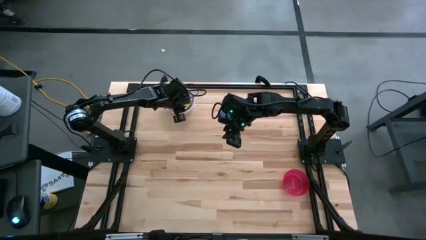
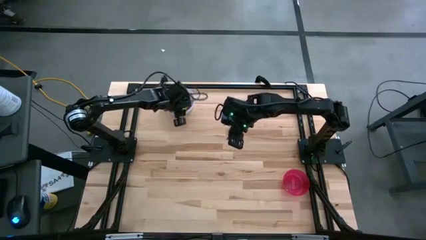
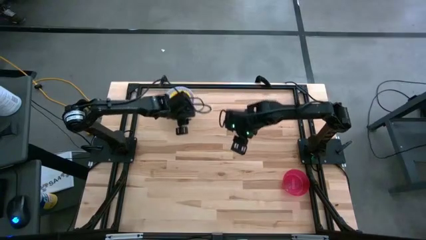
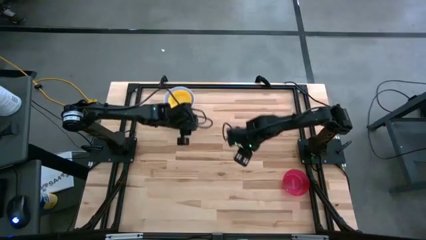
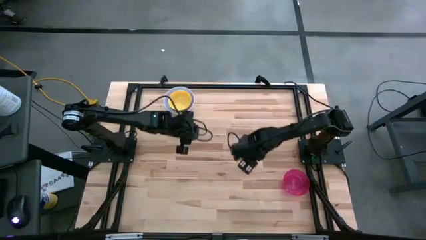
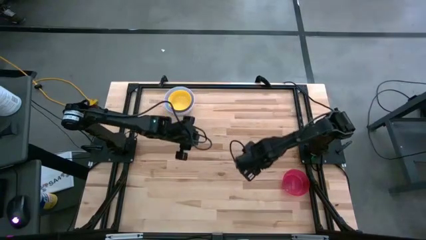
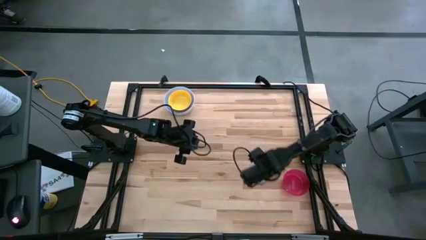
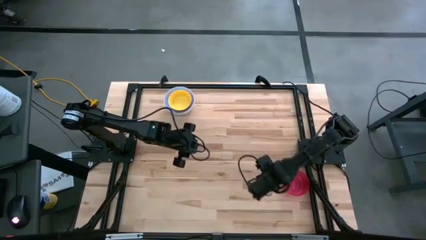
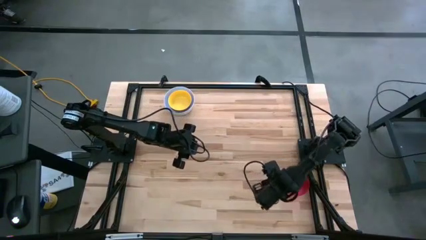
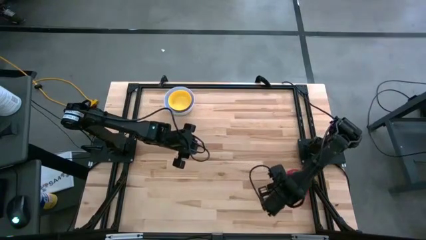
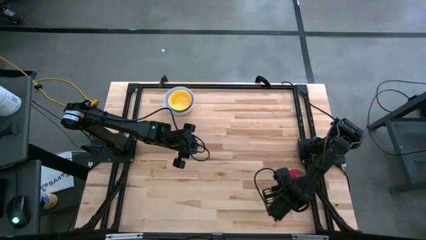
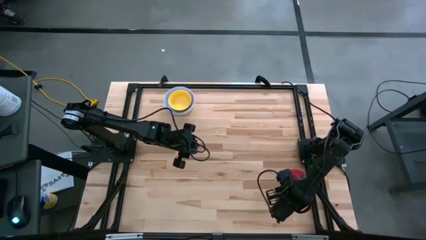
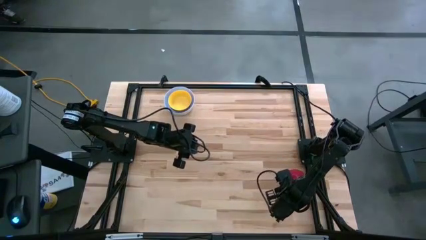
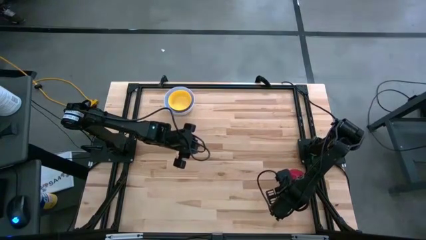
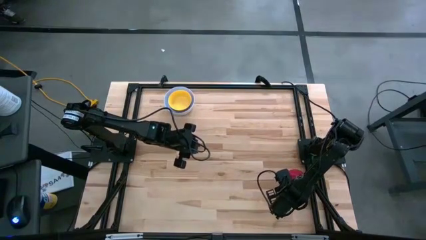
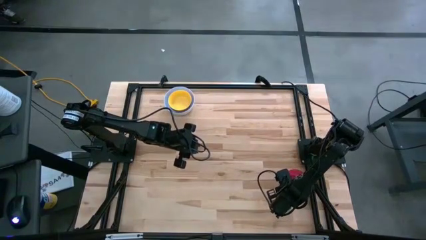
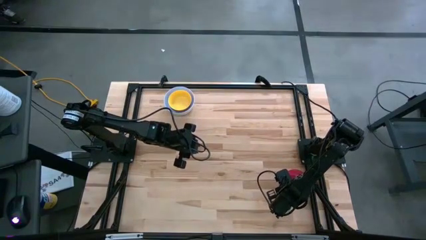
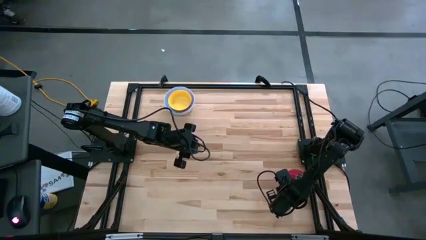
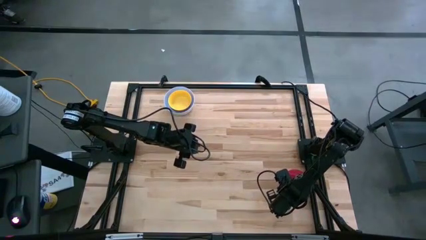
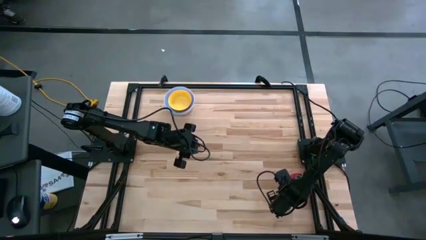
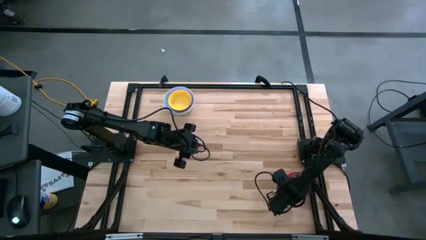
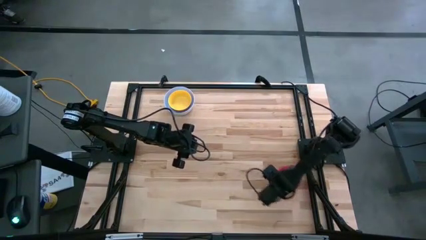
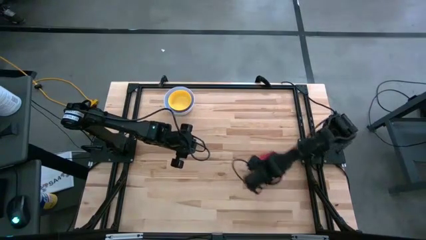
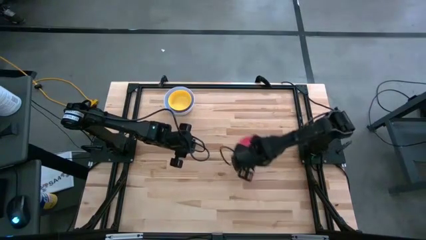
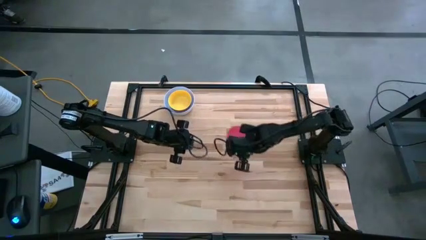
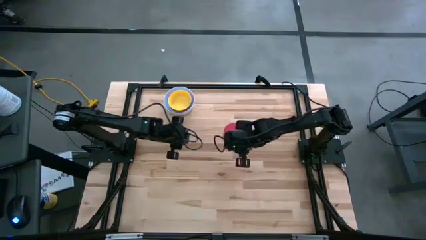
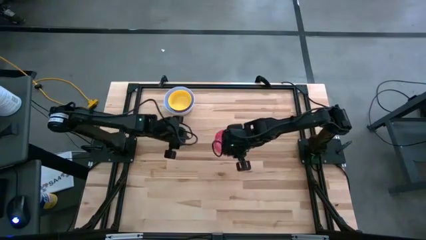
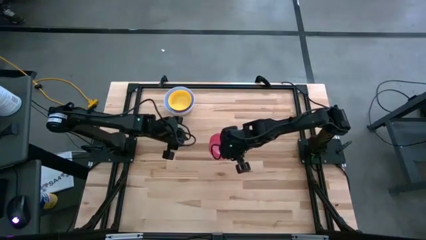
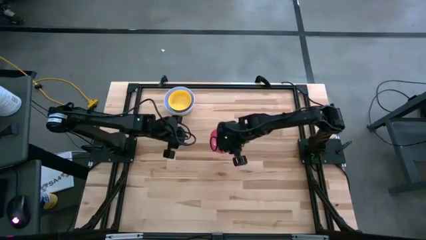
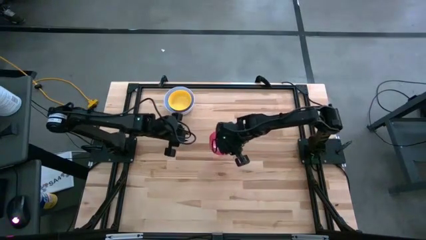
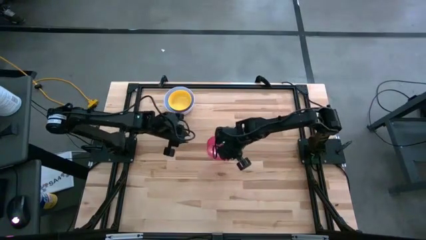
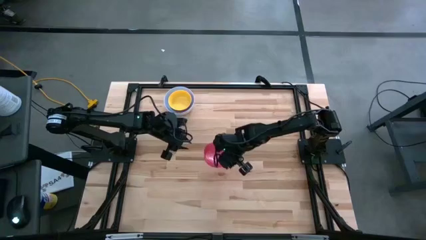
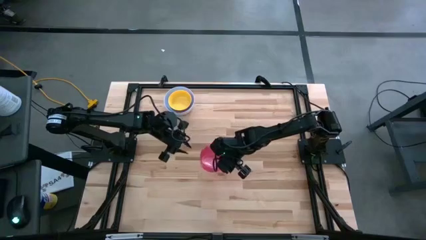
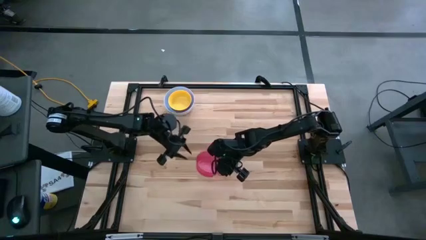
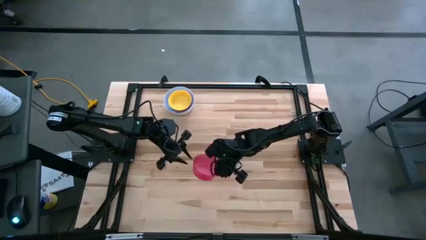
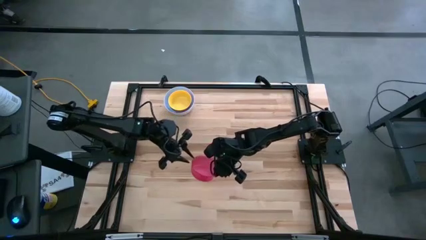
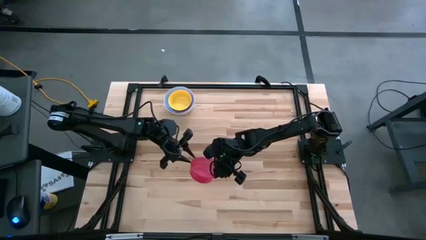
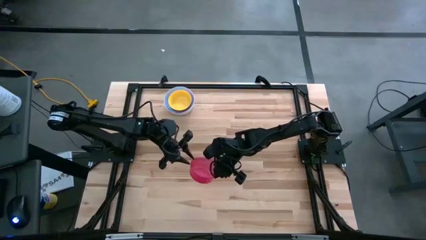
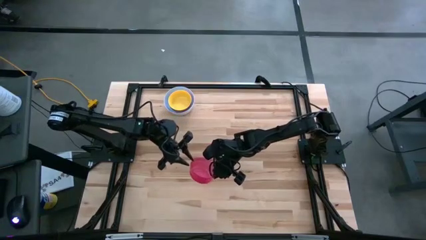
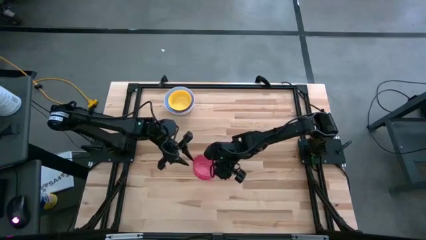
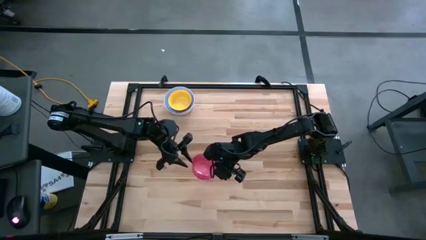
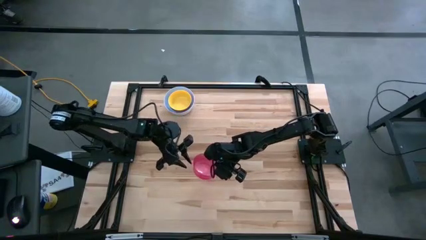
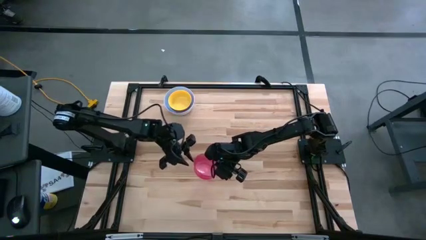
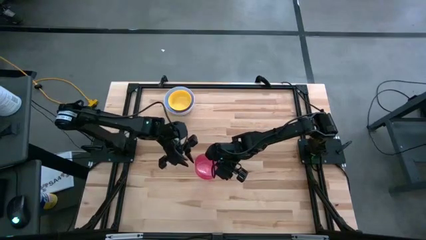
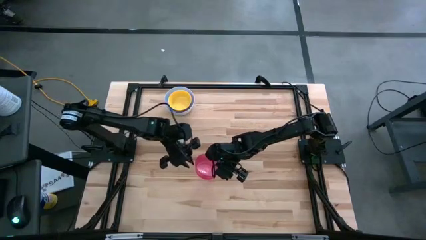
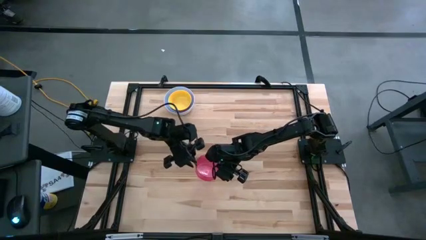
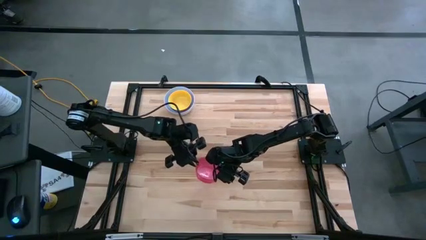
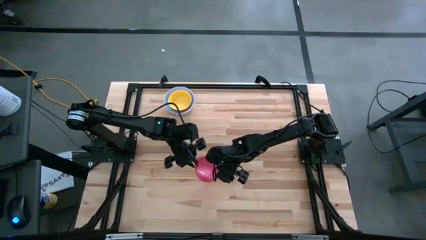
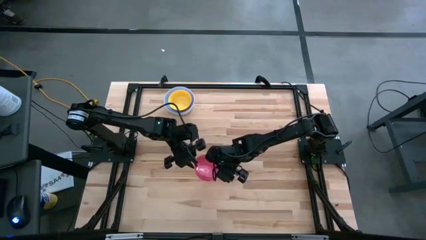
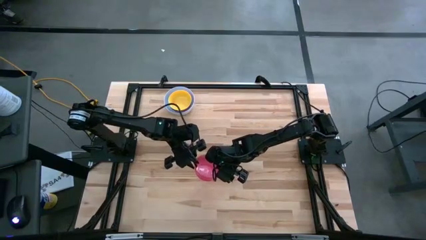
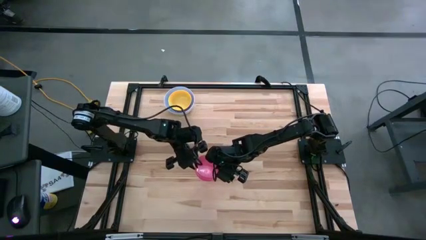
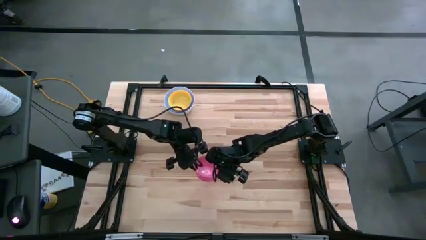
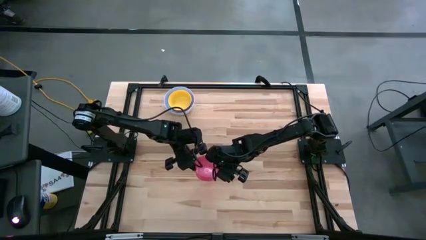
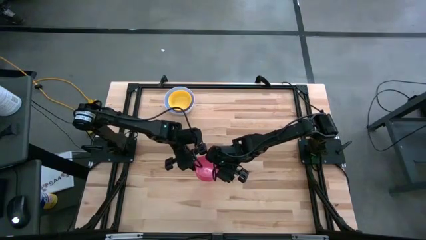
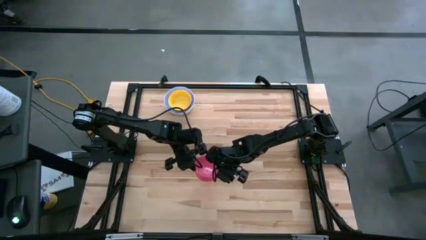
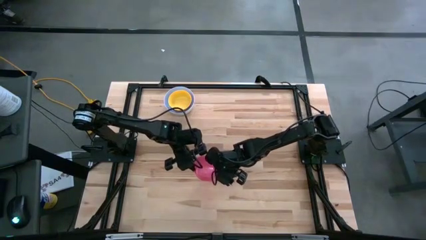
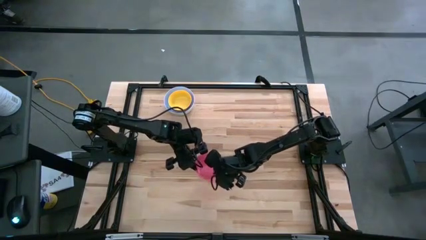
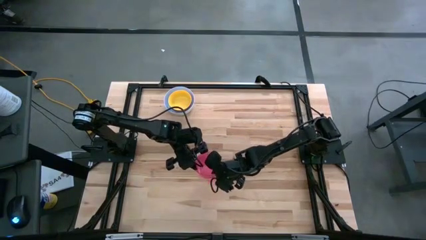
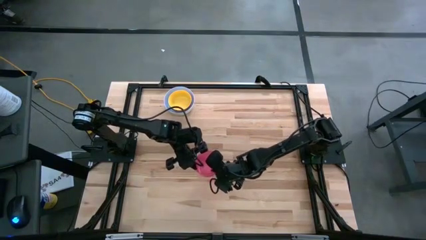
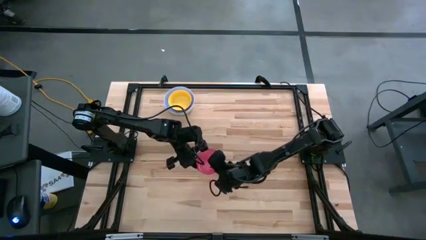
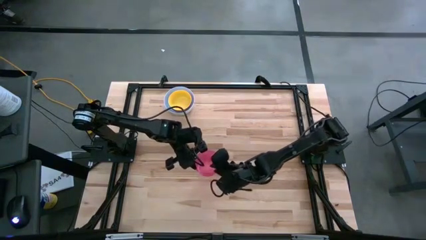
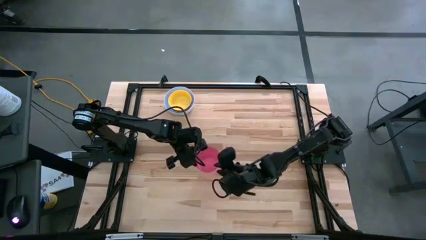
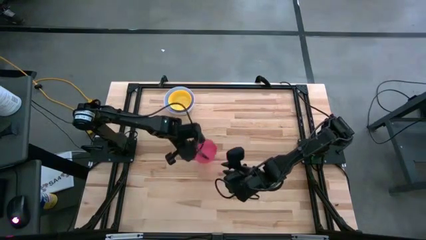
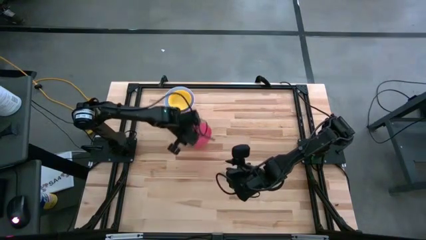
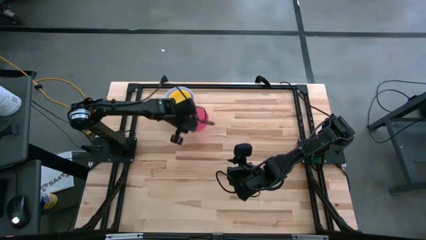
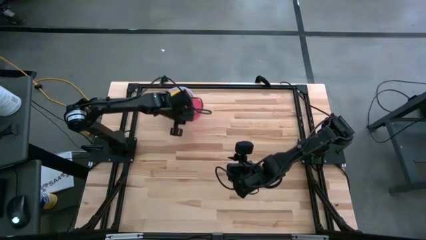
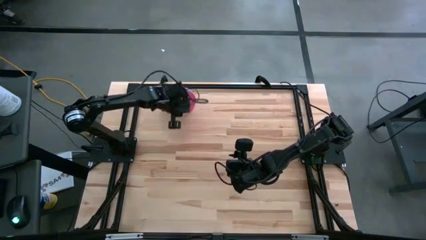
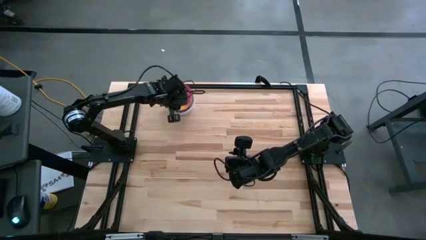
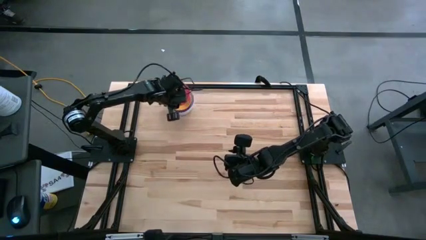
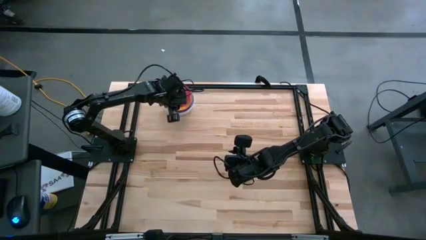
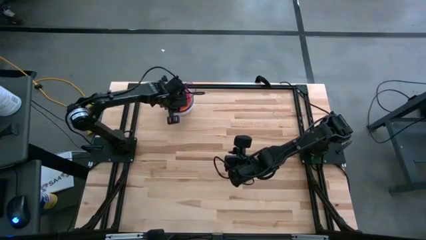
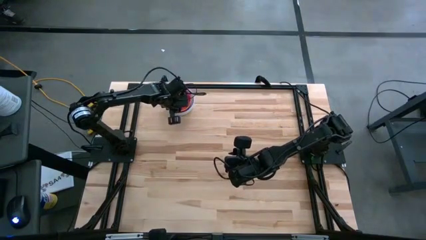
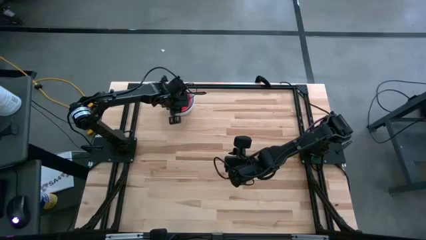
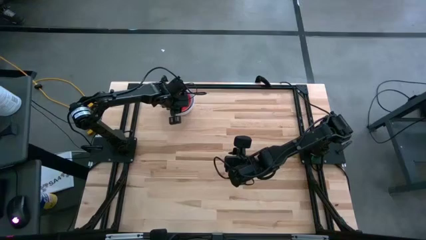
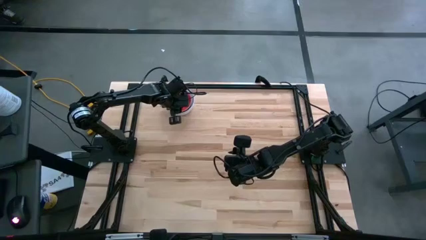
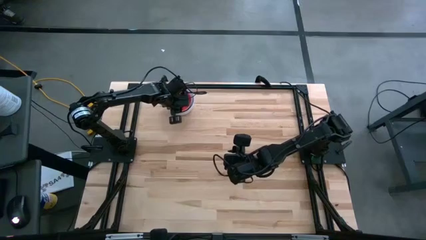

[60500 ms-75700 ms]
Stack the red bowl on top of the yellow bowl
